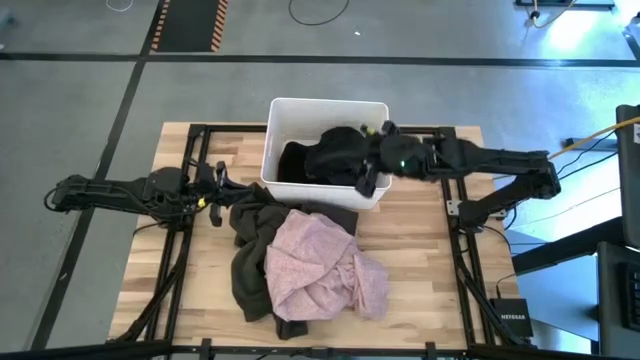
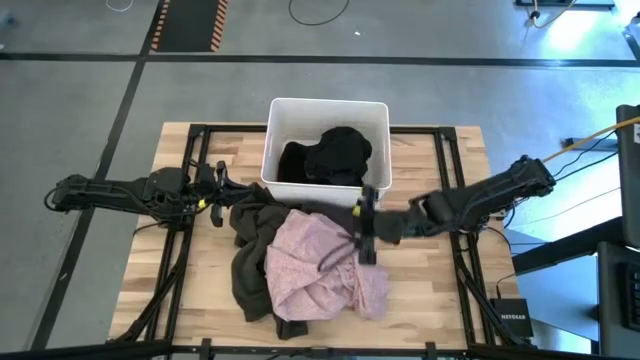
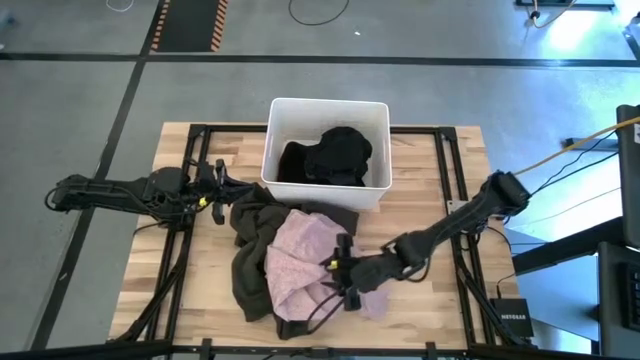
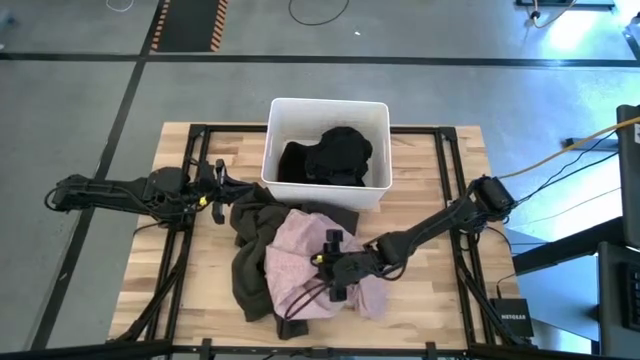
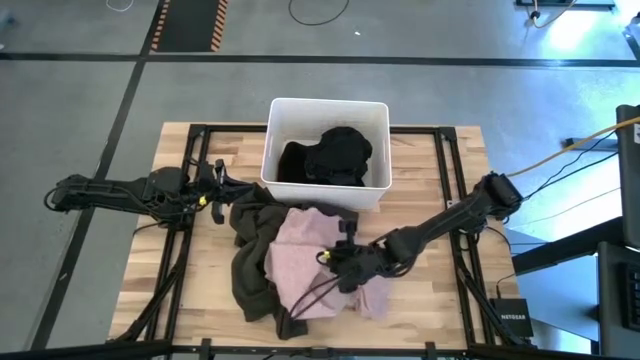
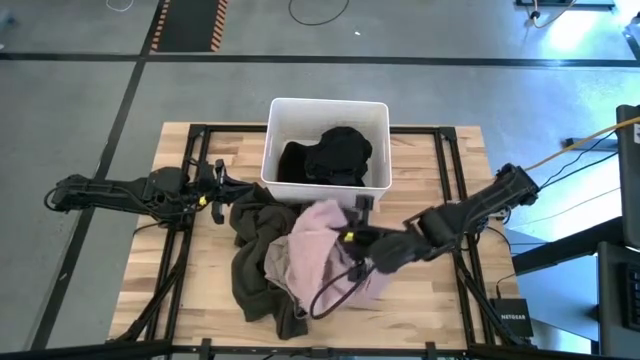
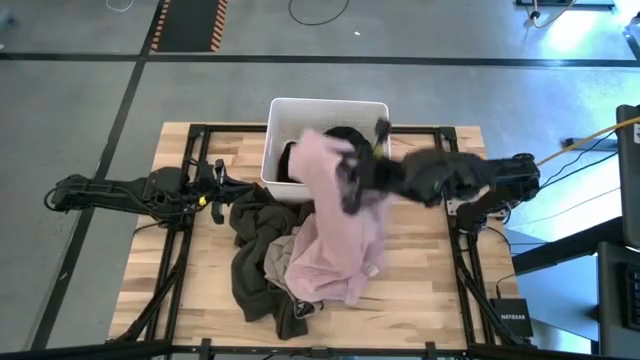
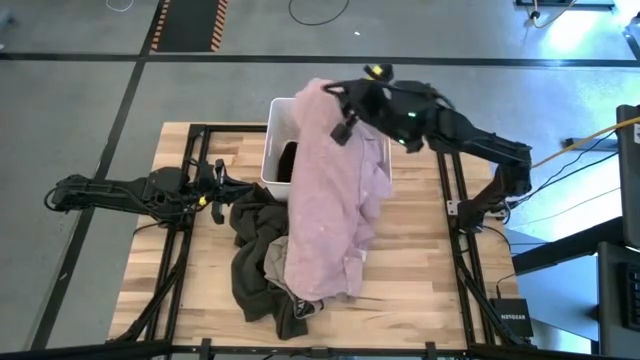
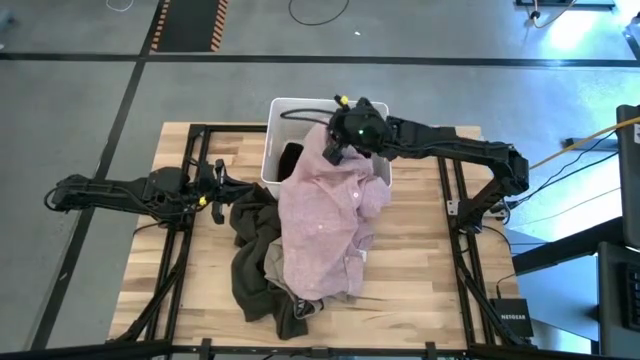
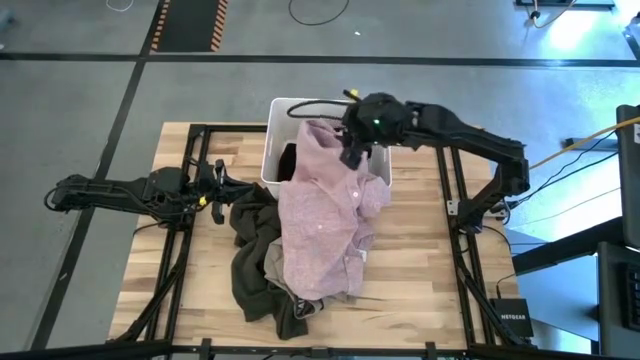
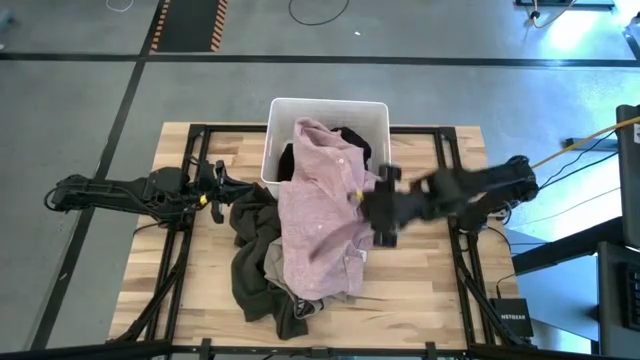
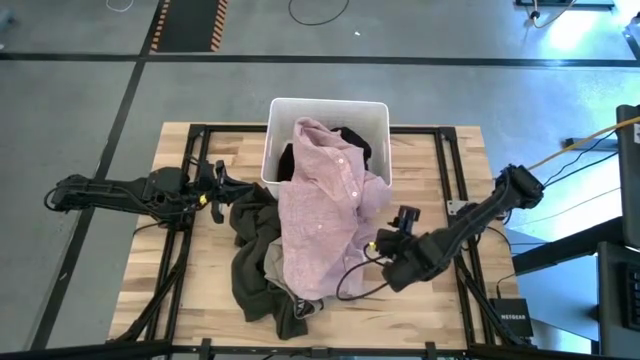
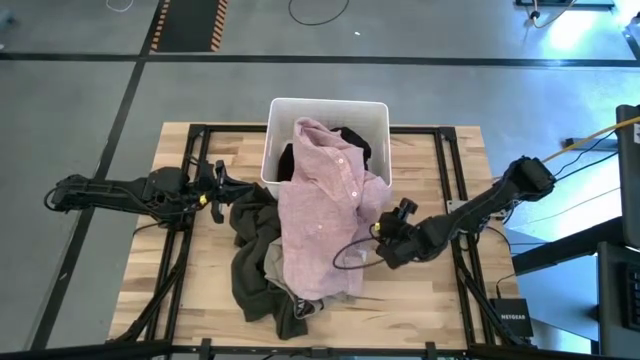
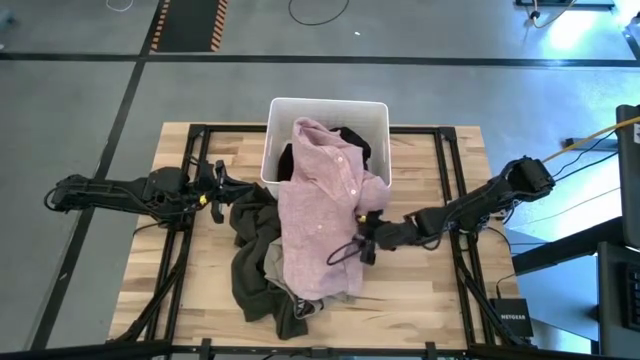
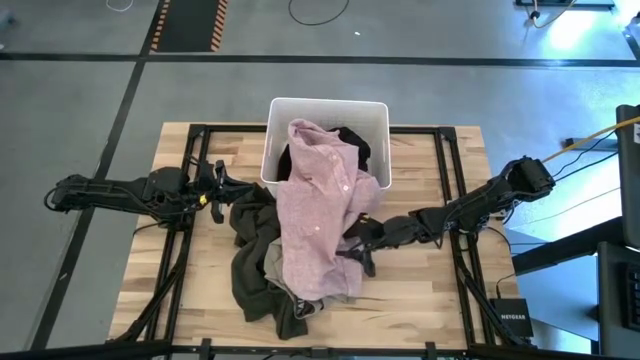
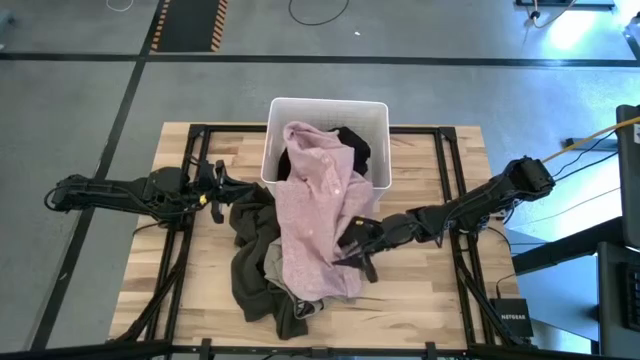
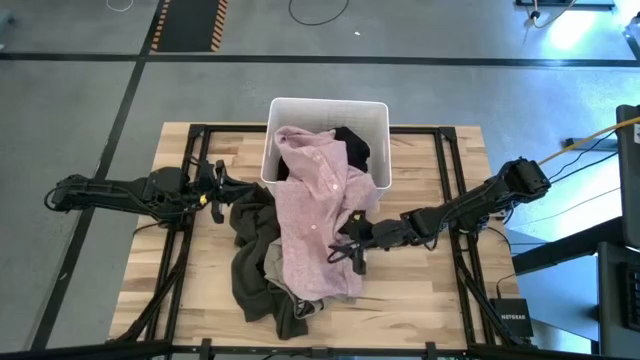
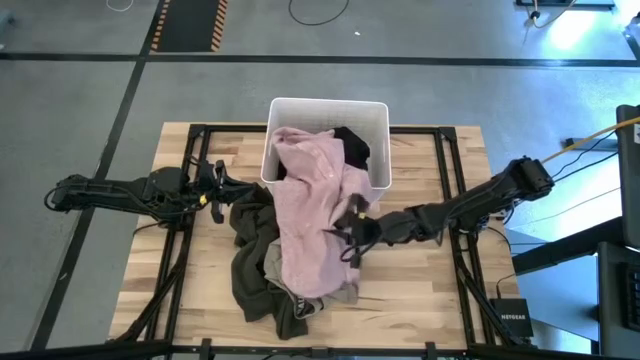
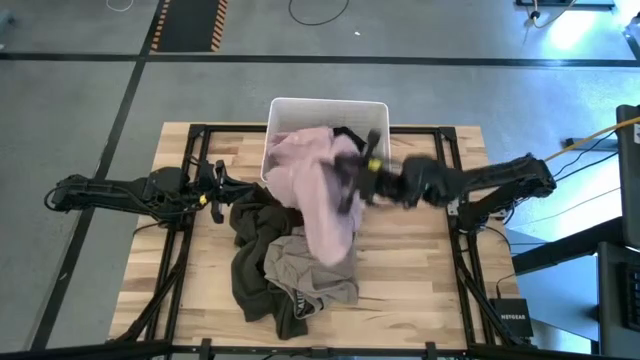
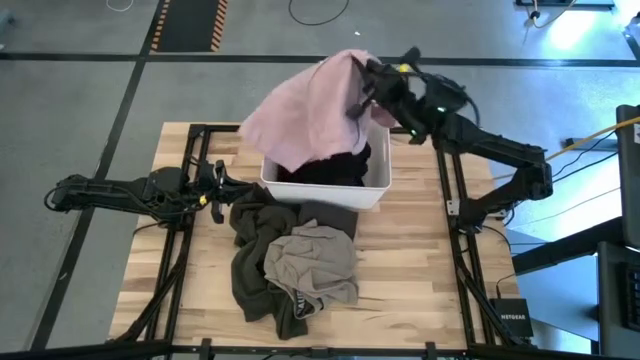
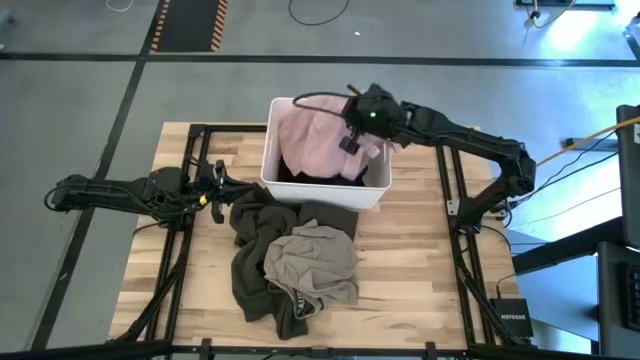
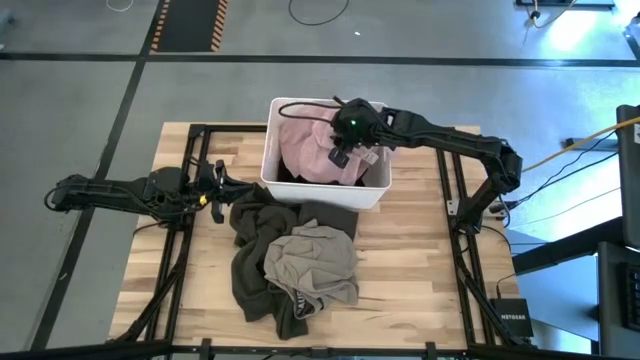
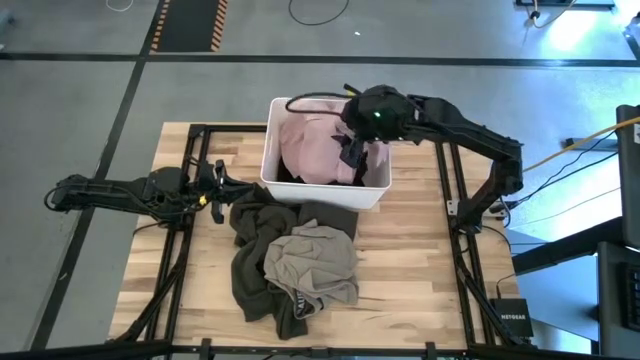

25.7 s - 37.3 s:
Task: Sort clothes
Put the pink polo shirt into the white laundry bin

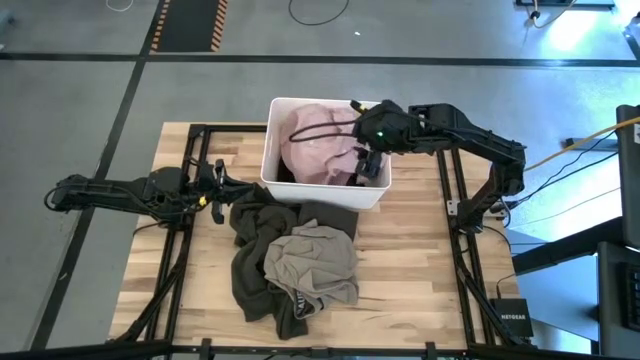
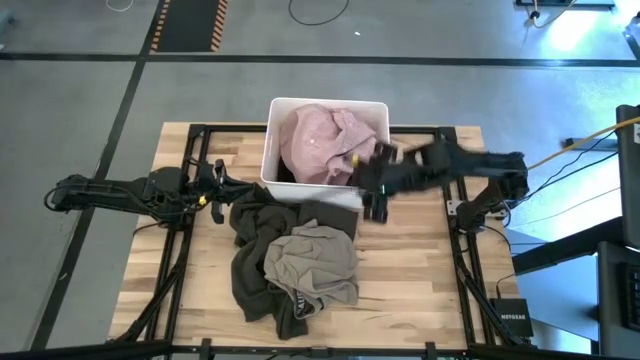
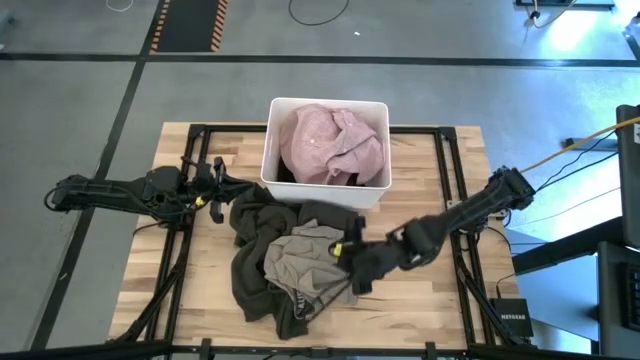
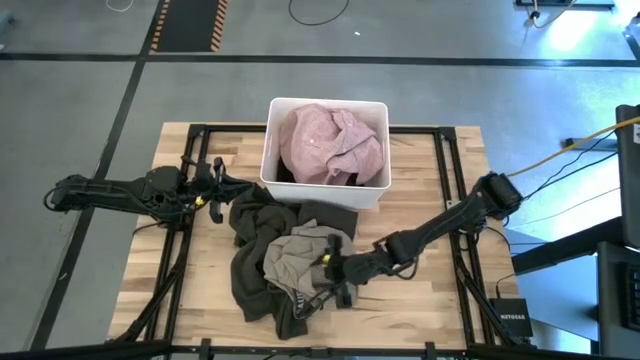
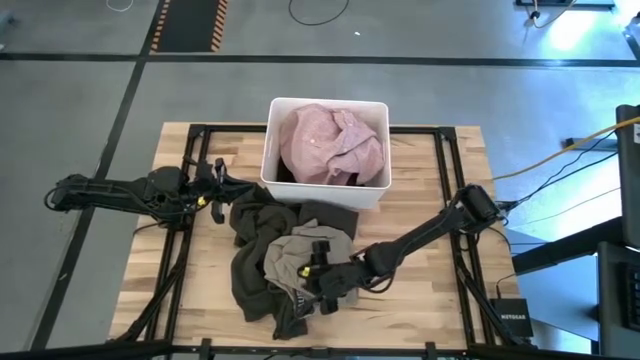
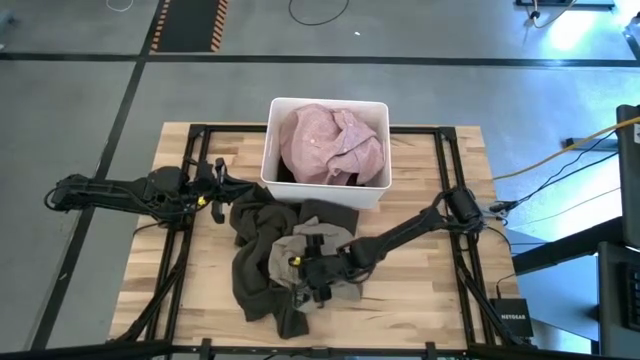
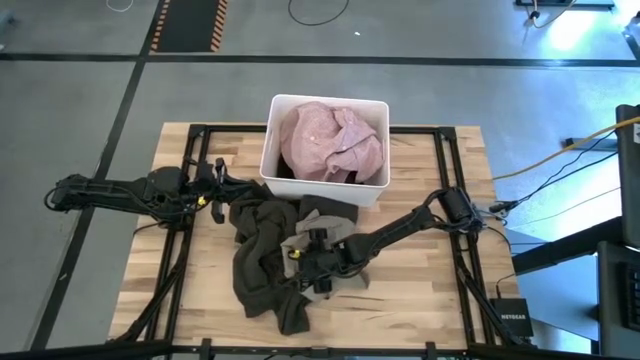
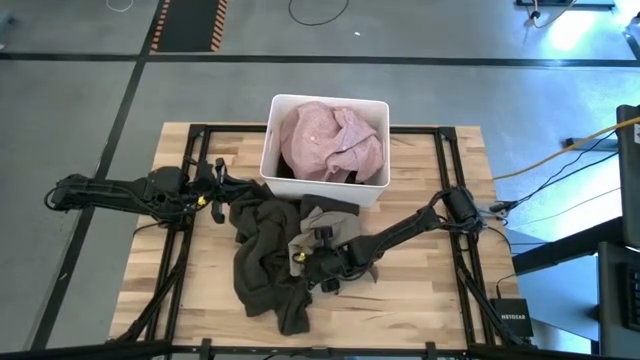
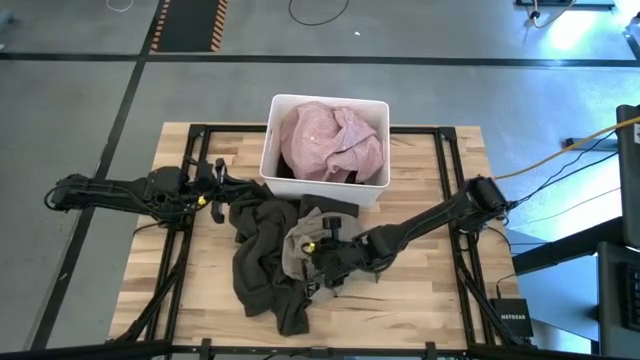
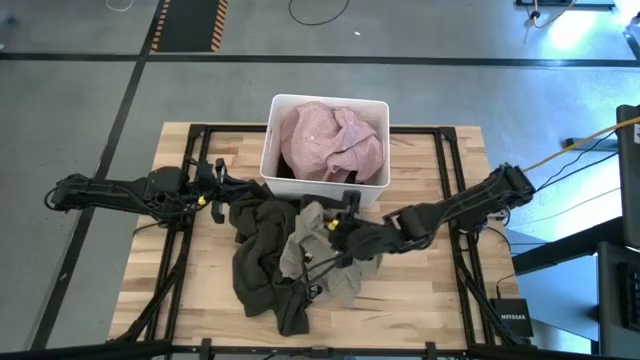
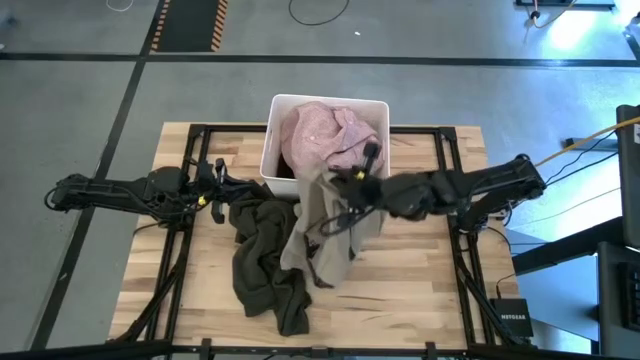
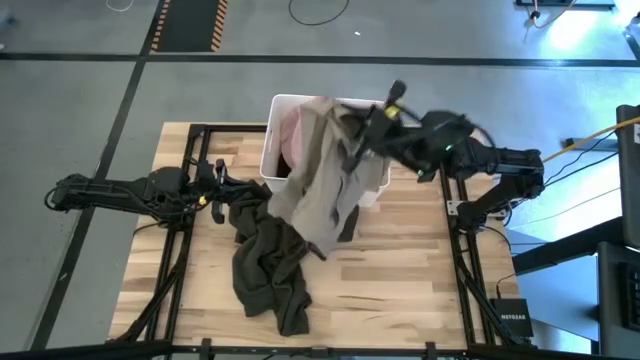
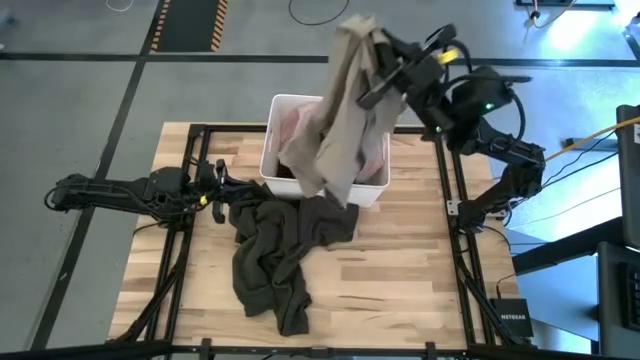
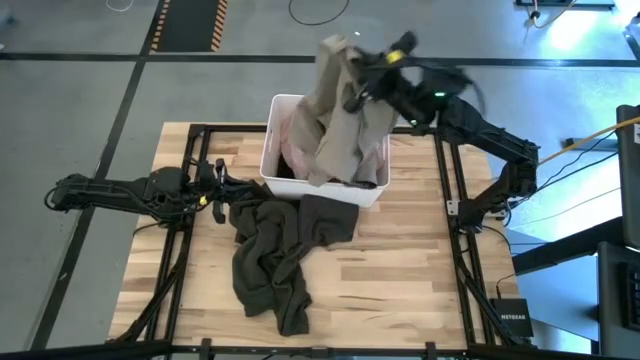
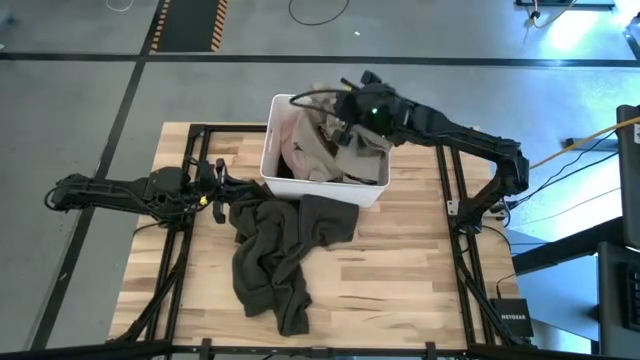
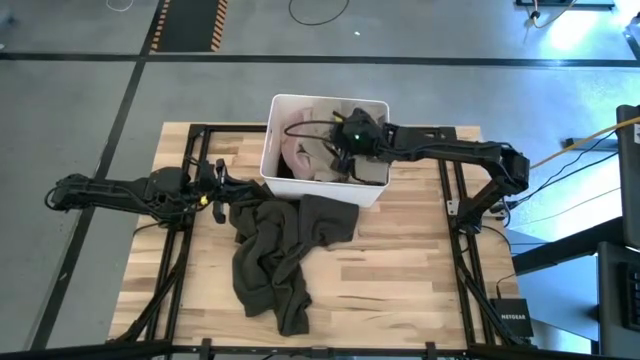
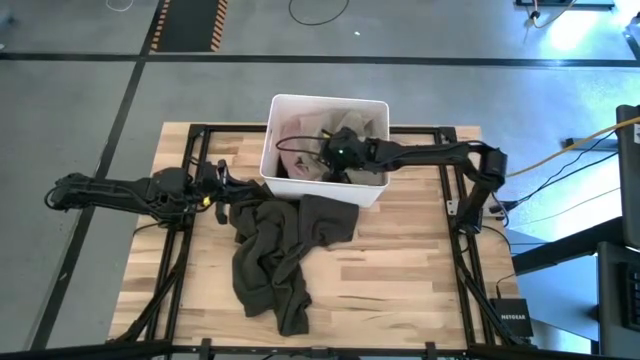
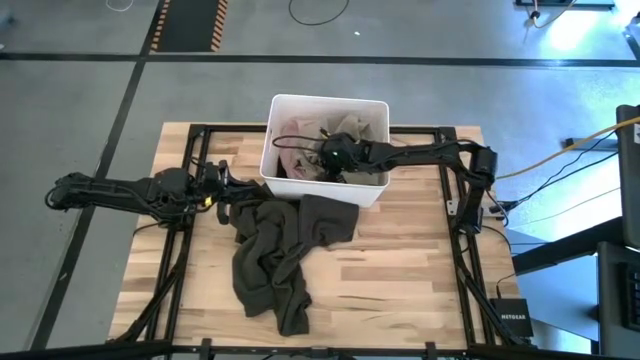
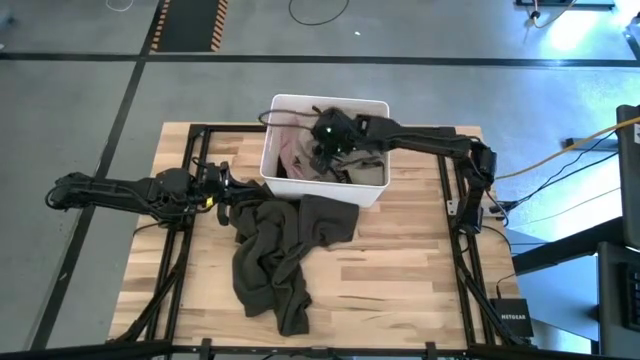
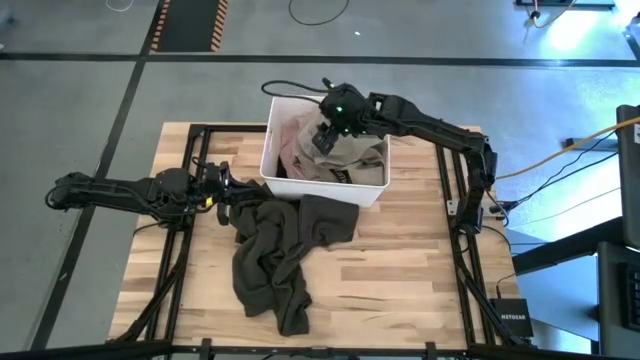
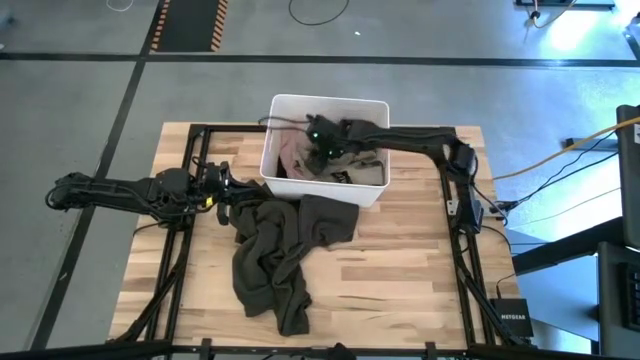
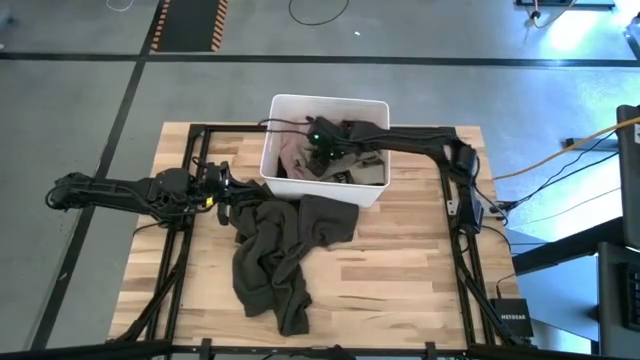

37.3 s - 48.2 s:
Put the brown short into the white laundry bin
